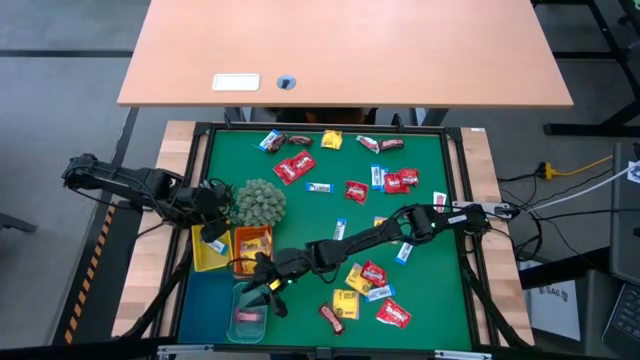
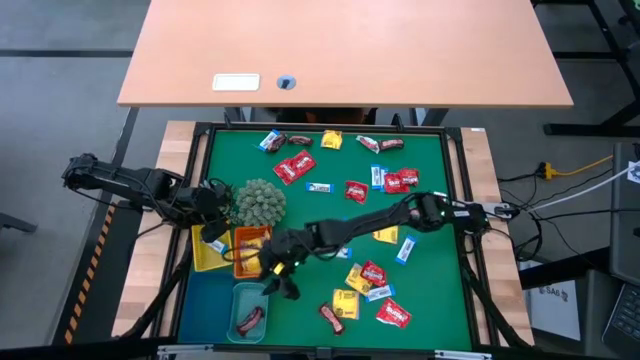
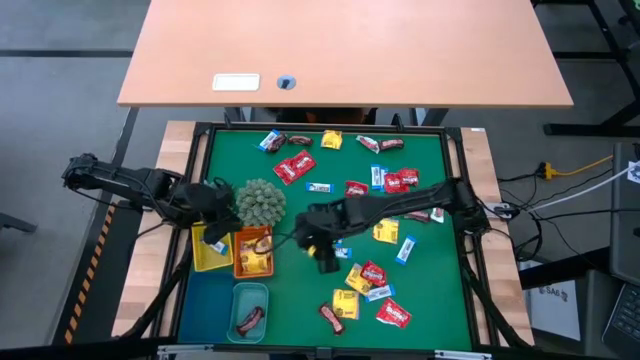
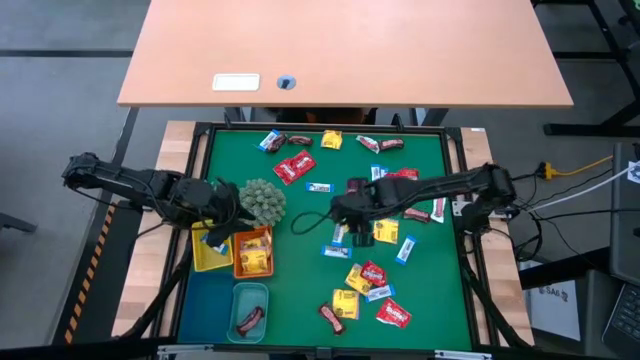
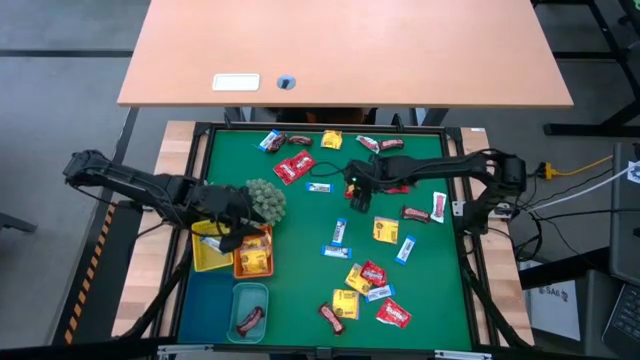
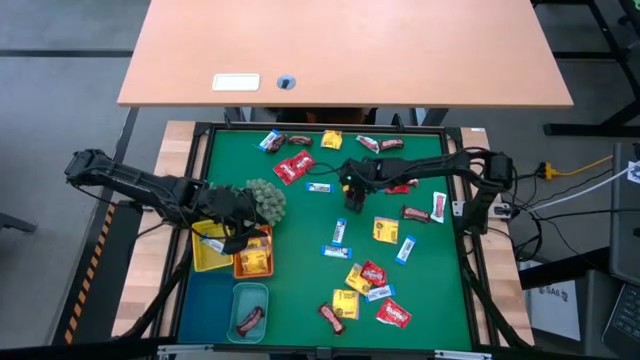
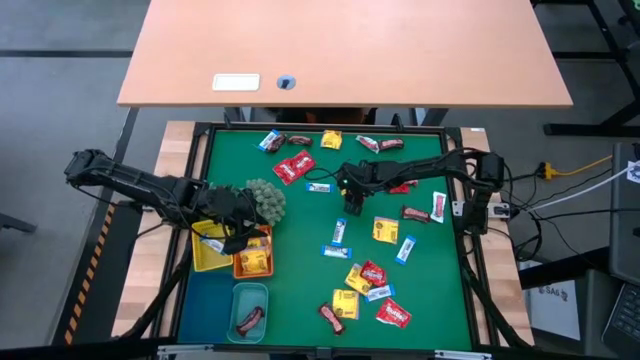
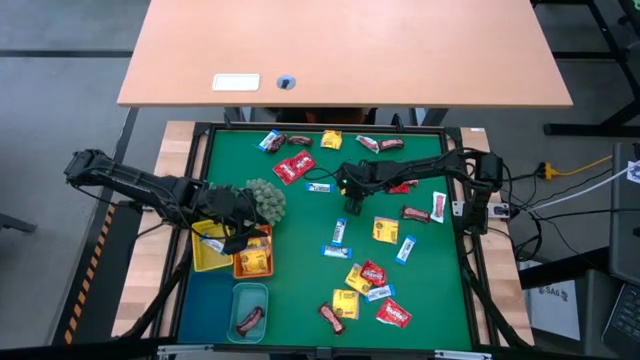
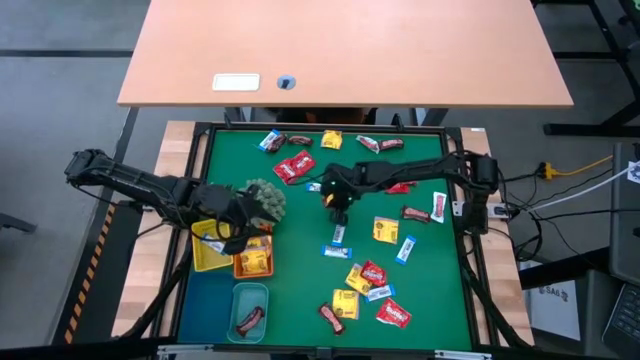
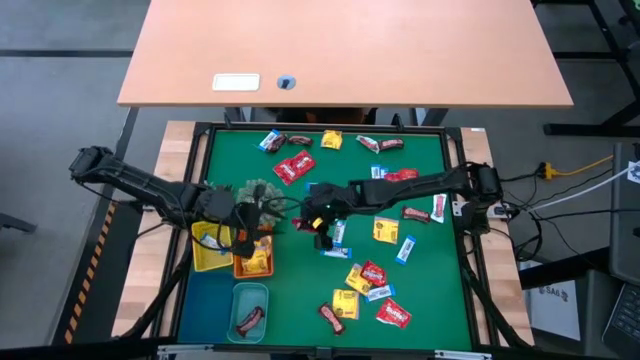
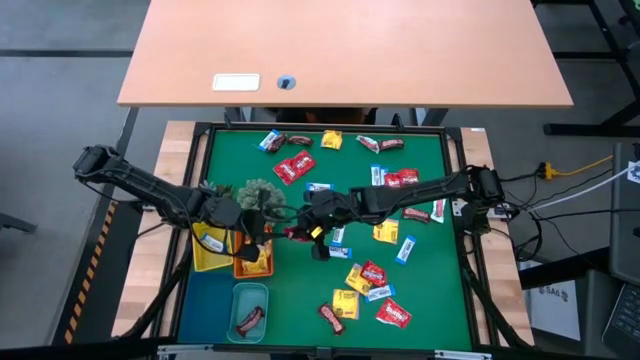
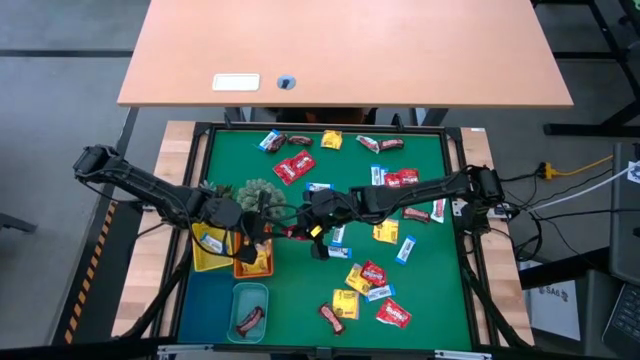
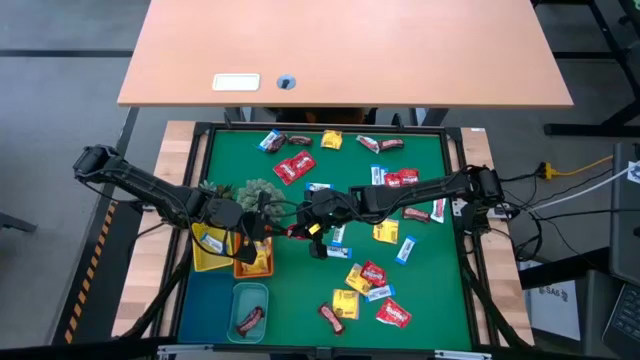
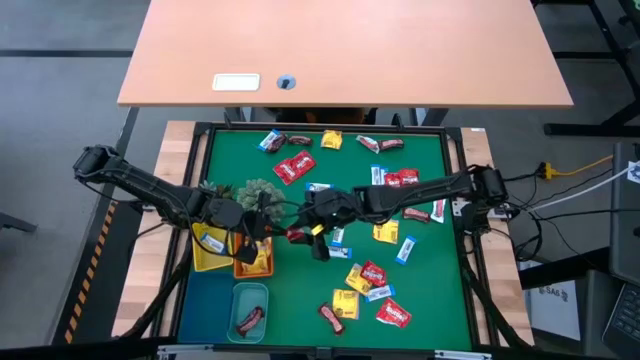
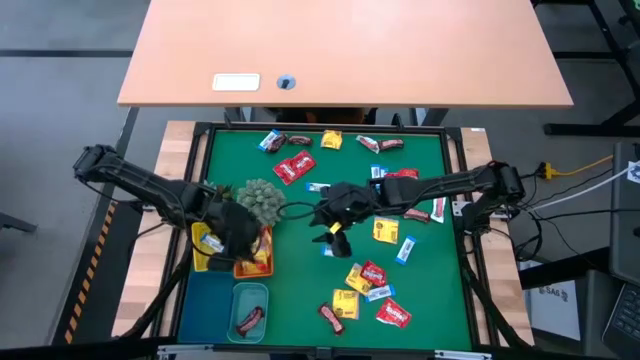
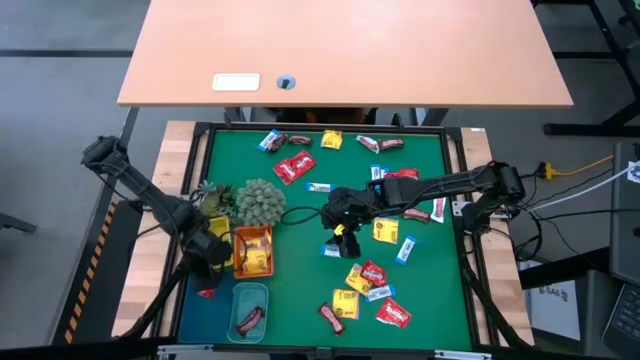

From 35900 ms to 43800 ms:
Task: Sort candy
Put the red candy into the blue basket

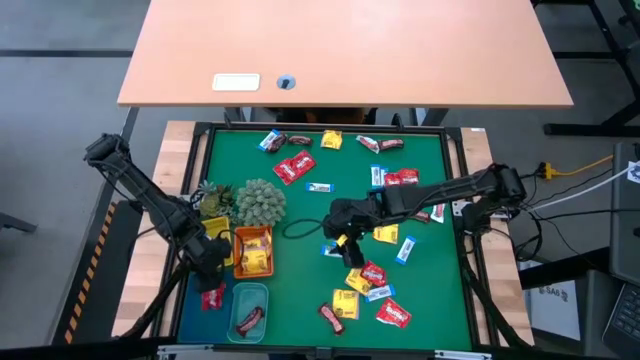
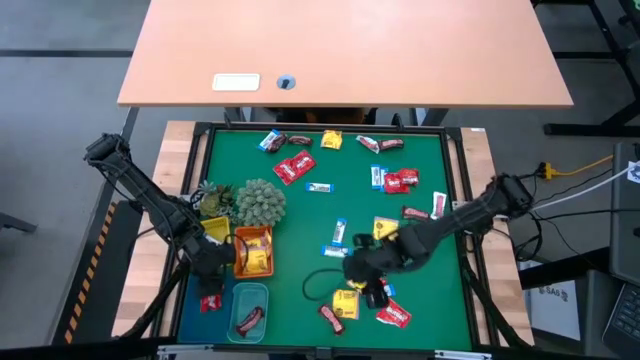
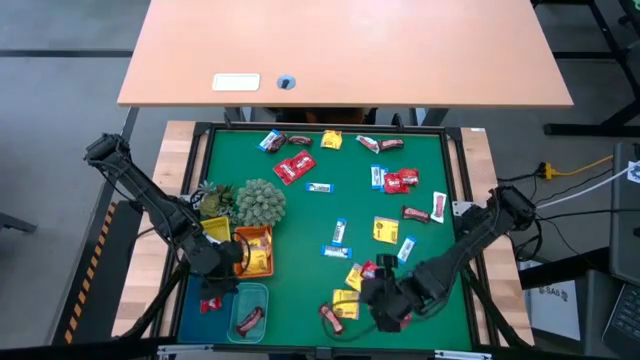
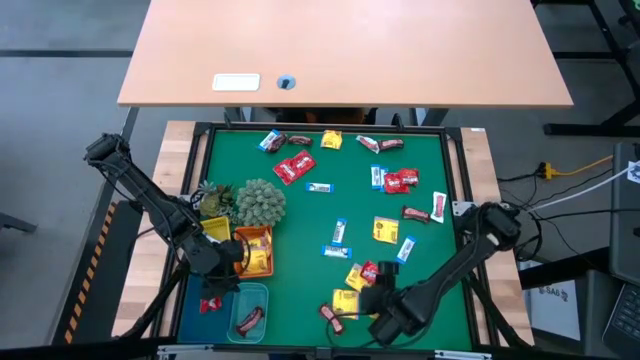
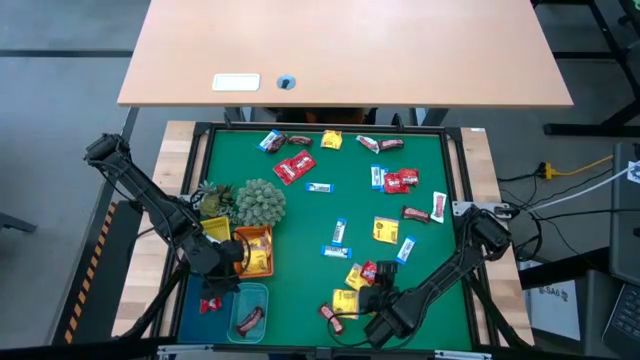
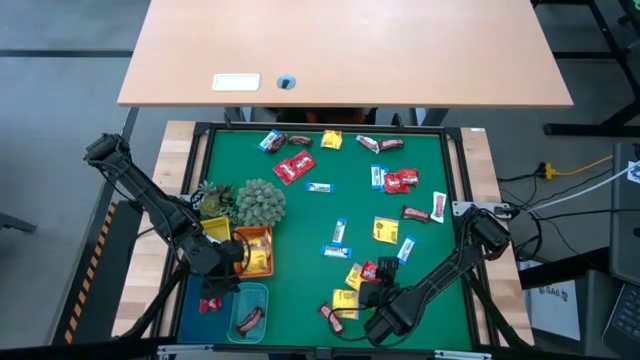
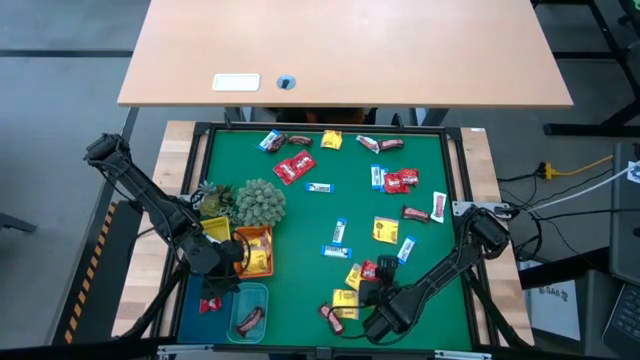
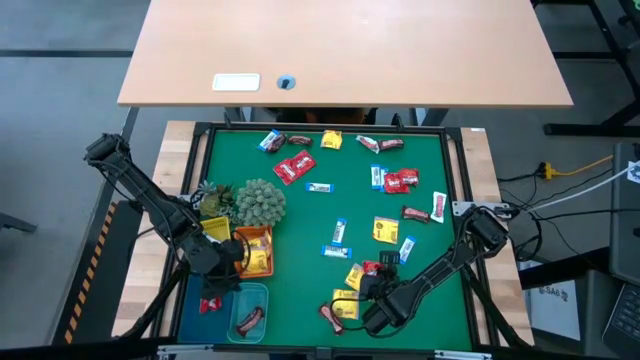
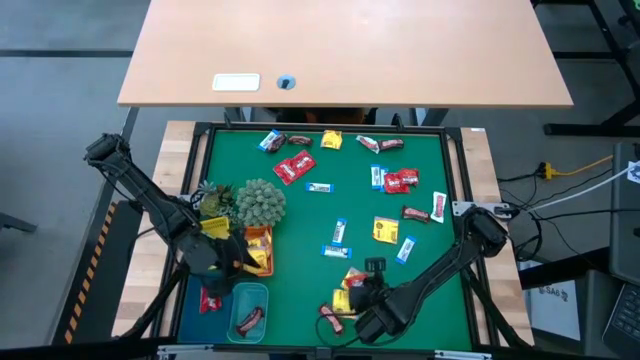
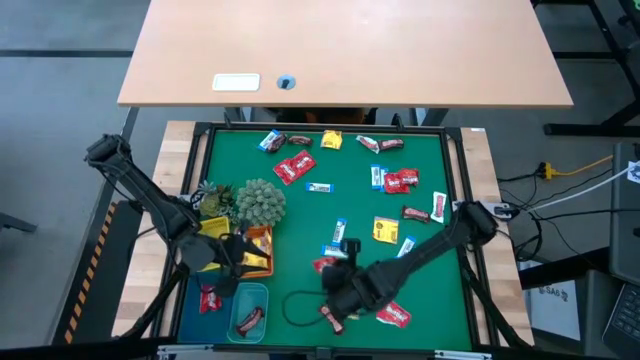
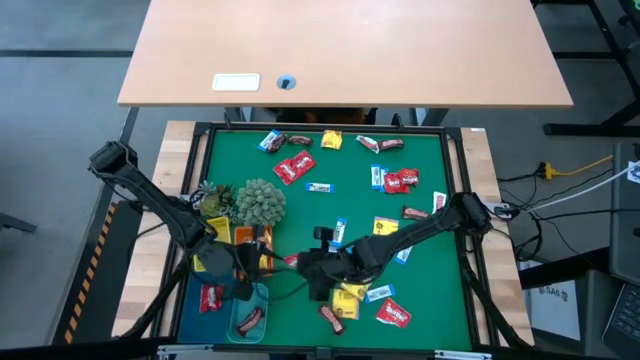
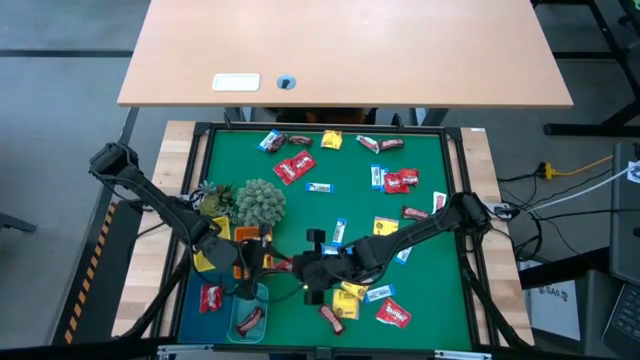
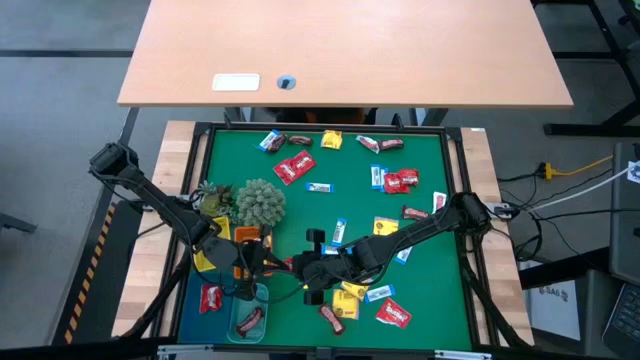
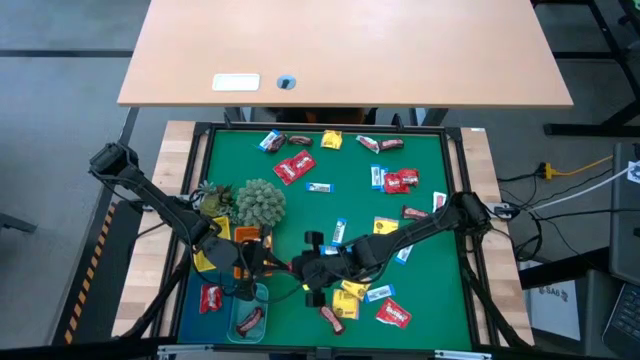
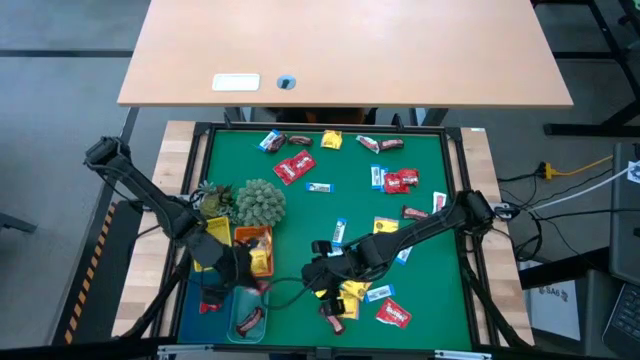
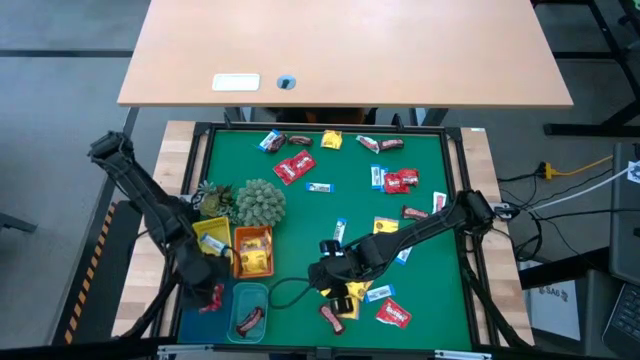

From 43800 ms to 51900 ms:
Put the red candy into the blue basket

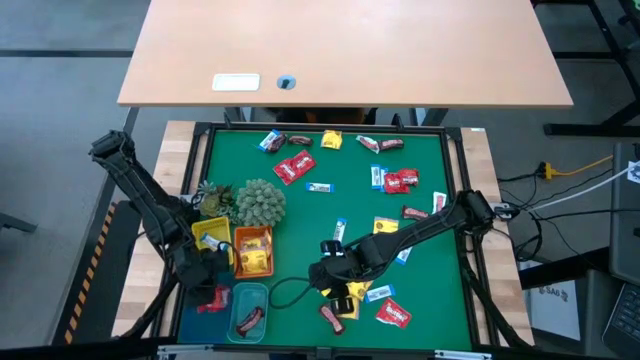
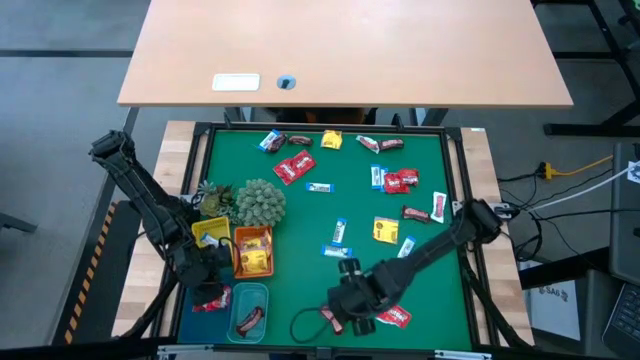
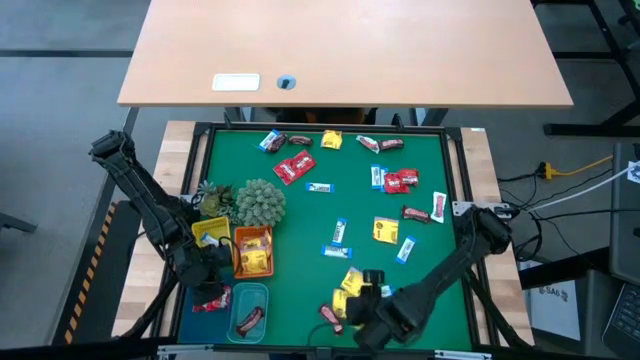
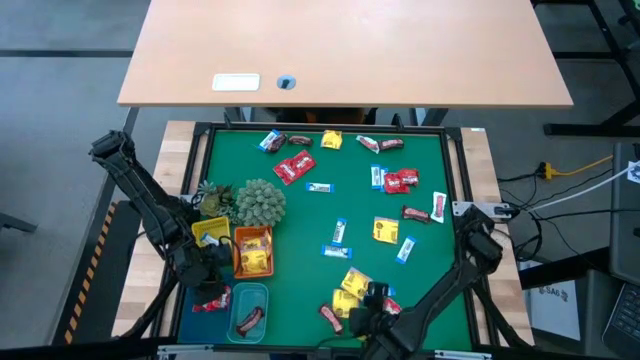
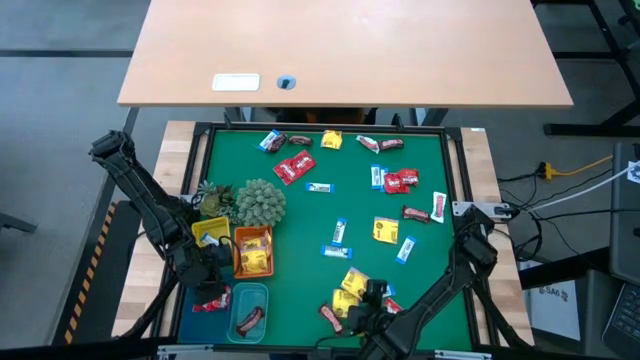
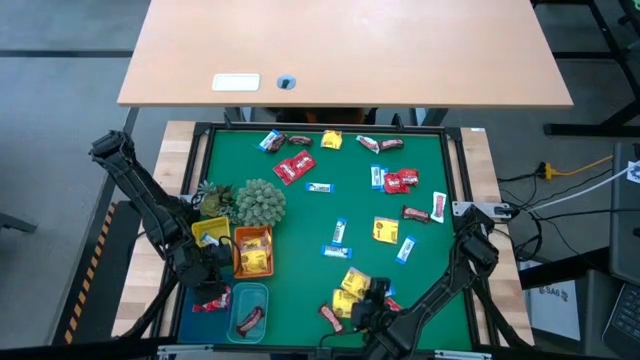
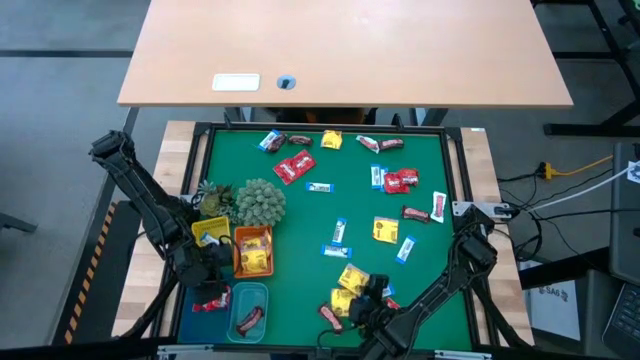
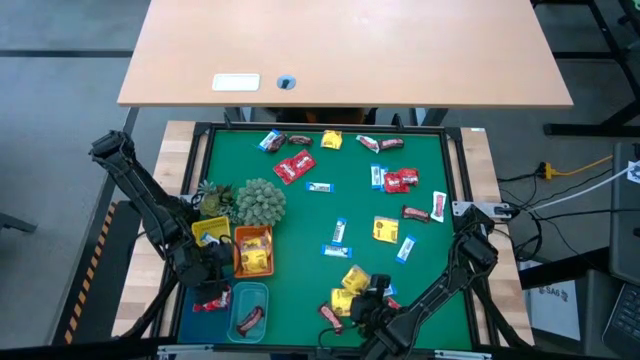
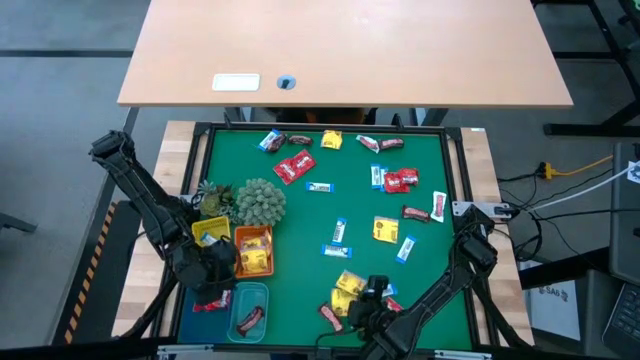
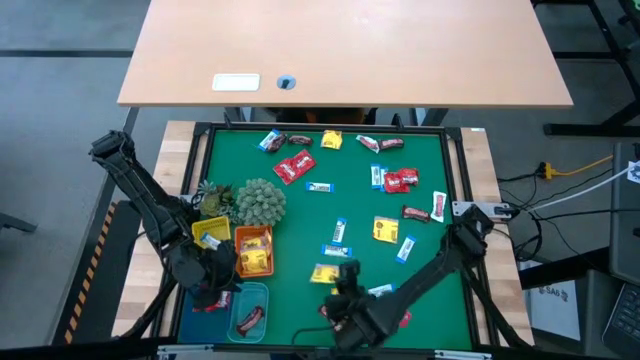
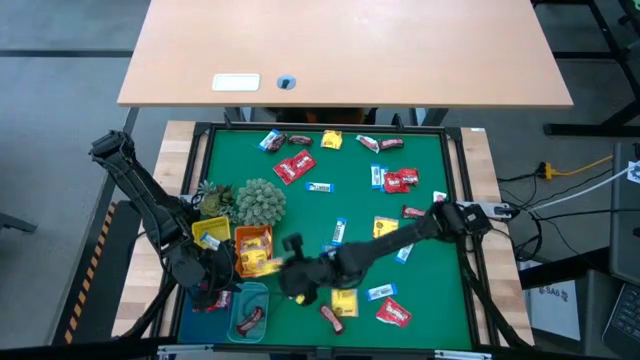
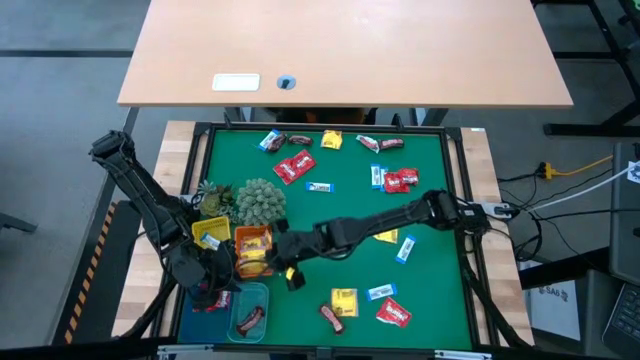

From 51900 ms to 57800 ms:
Put the yellow candy into the orange basket
